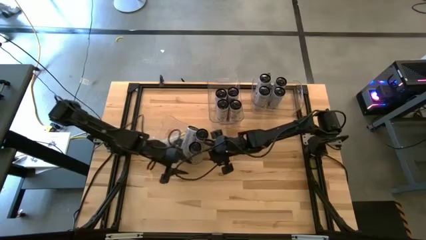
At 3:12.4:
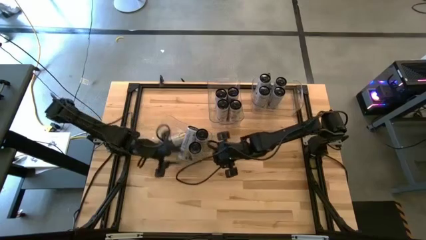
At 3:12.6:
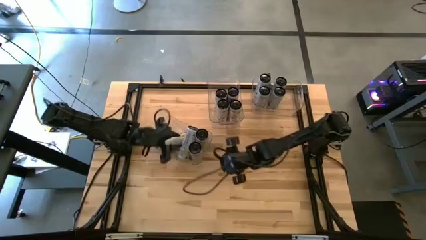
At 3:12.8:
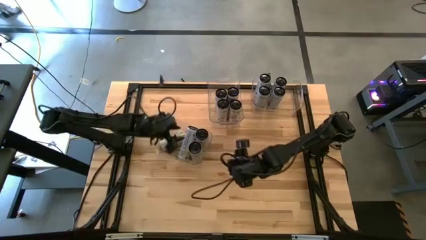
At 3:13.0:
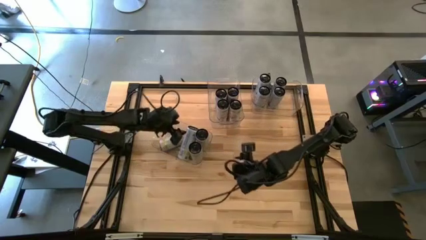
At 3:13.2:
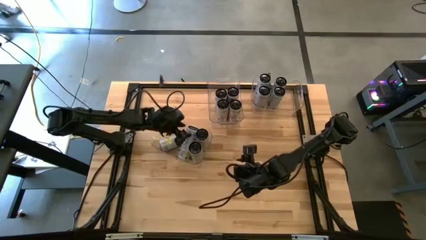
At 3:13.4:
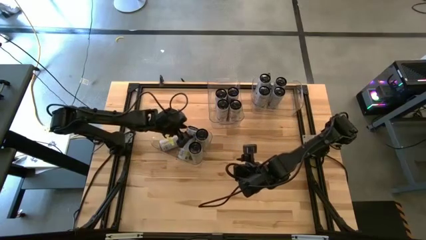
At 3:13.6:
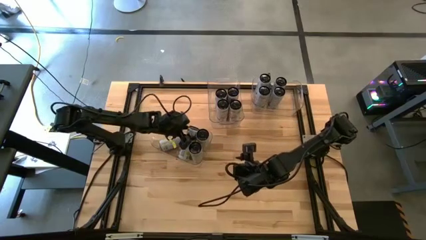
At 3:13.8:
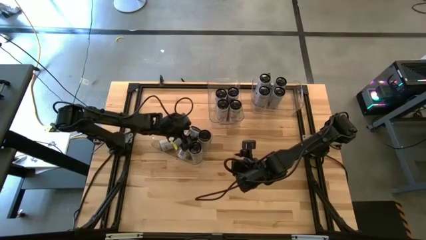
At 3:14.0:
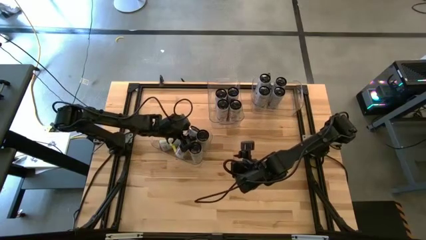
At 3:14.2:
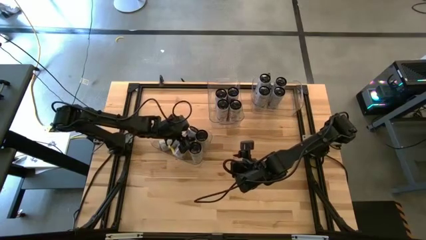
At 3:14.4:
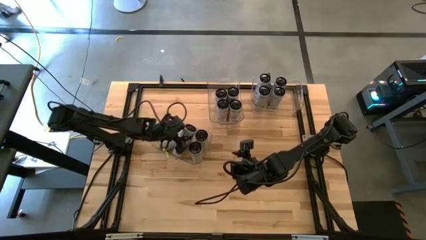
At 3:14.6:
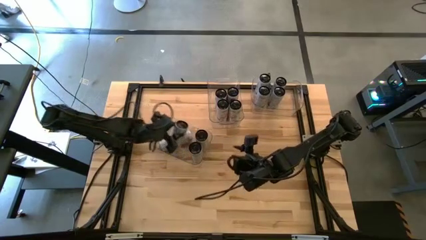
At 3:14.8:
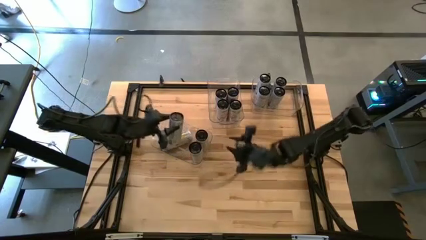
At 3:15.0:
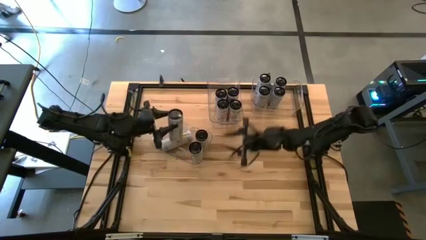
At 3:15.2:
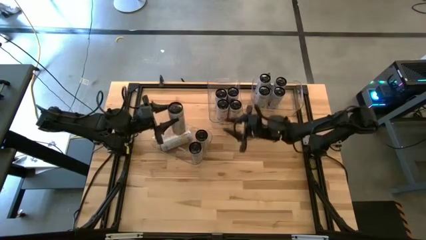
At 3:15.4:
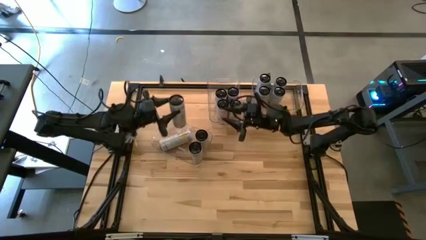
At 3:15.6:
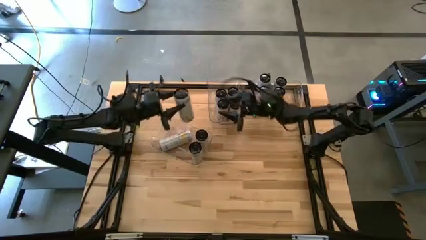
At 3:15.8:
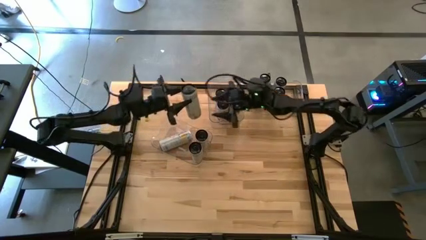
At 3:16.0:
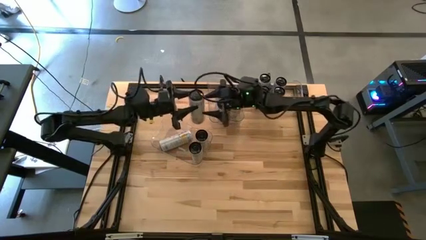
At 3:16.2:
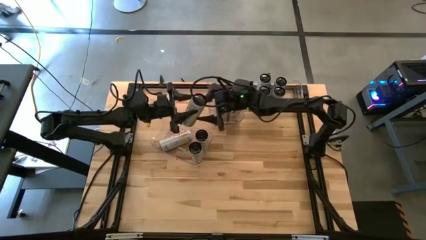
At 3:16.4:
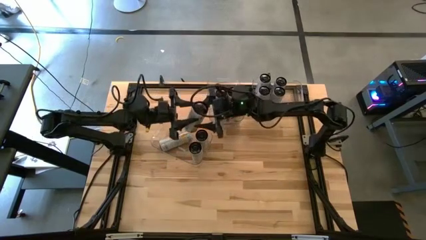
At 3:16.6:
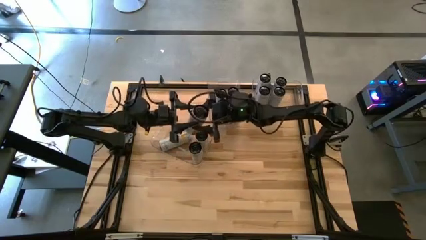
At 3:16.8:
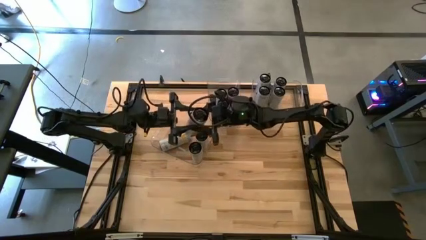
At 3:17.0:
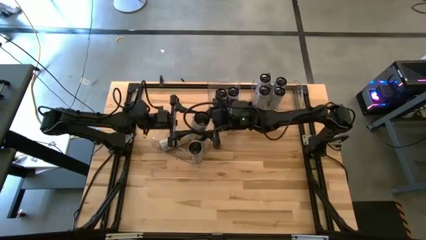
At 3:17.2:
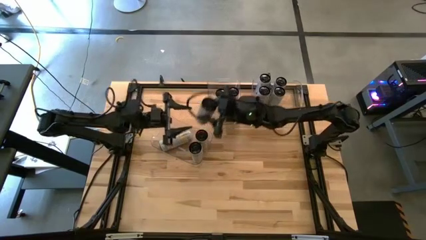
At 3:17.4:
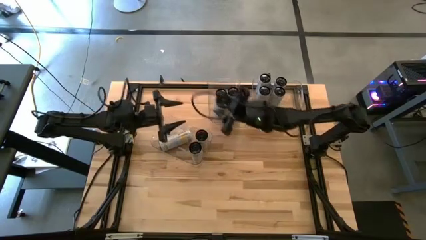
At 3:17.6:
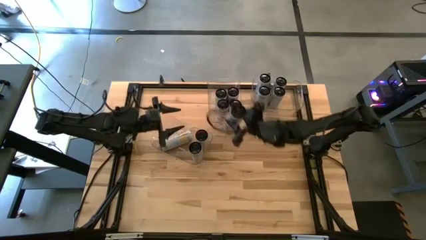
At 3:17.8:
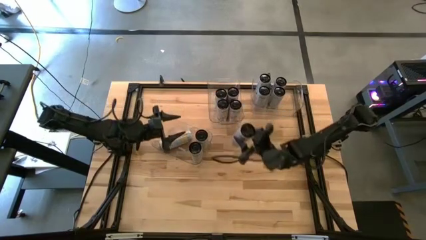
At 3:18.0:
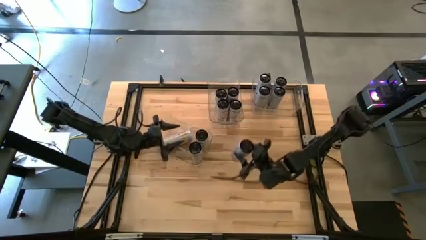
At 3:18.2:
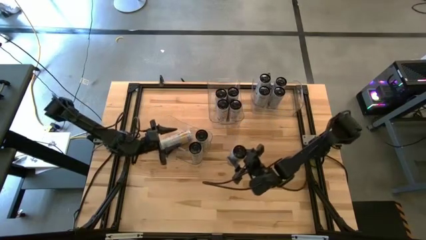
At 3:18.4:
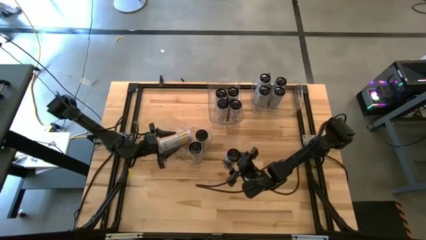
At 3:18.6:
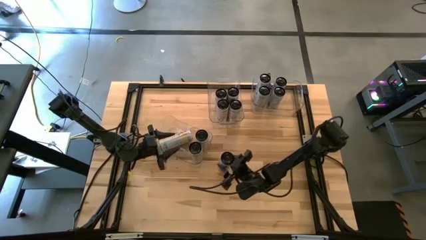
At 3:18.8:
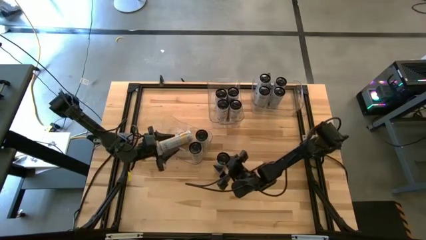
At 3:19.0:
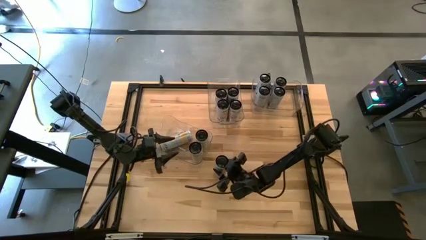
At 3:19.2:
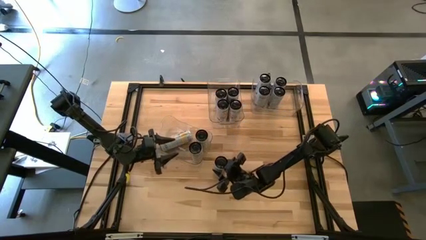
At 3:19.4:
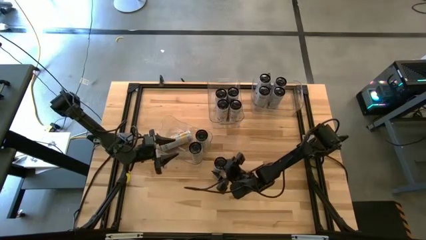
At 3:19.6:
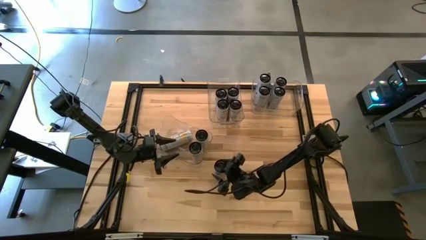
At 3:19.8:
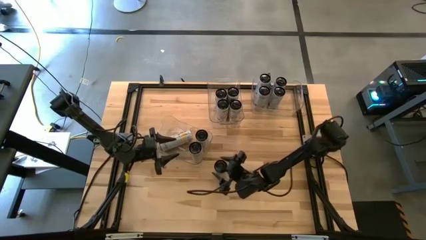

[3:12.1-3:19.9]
Task: Sort soda cans
Remove the white-yellow soda can from the top left transparent bin

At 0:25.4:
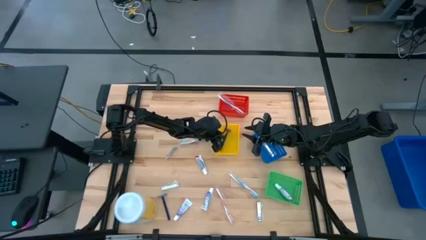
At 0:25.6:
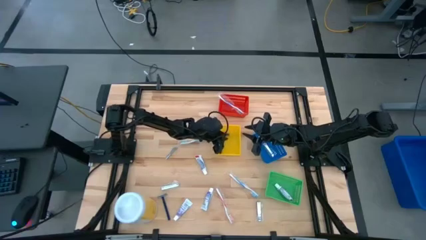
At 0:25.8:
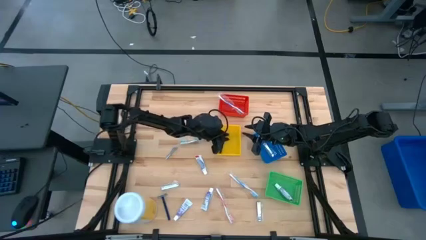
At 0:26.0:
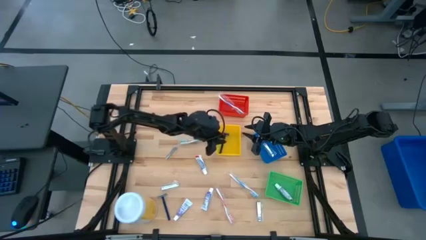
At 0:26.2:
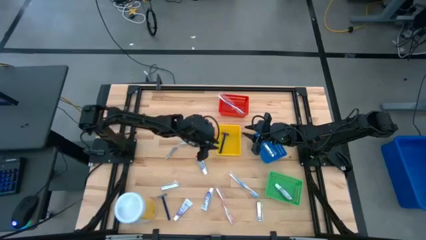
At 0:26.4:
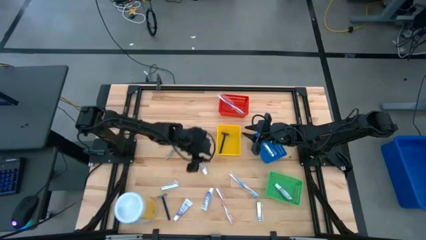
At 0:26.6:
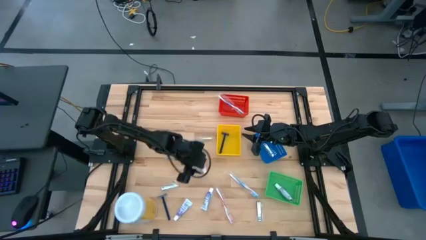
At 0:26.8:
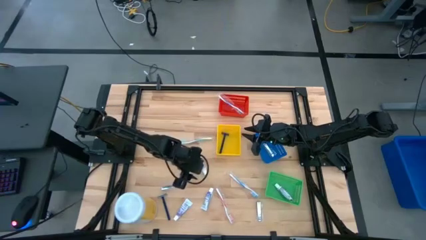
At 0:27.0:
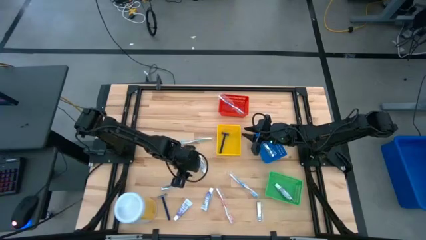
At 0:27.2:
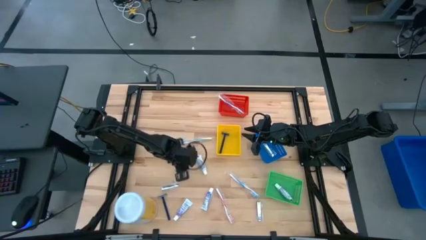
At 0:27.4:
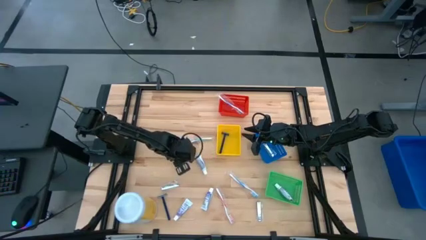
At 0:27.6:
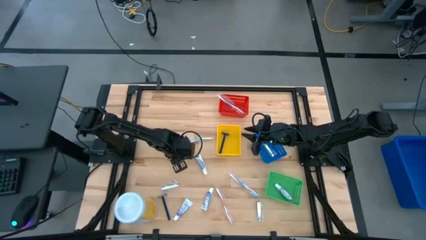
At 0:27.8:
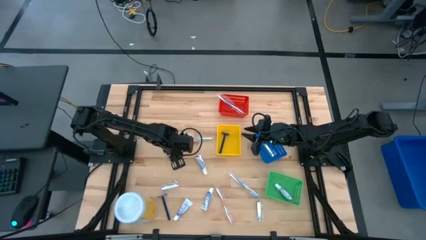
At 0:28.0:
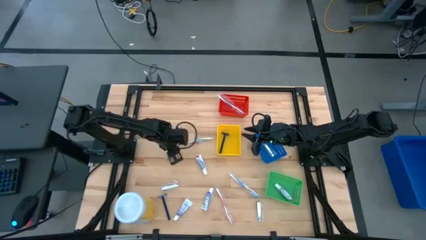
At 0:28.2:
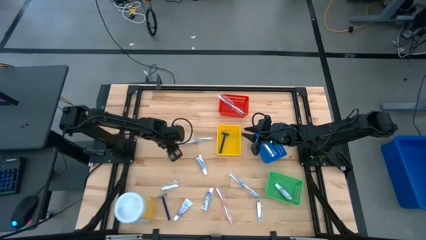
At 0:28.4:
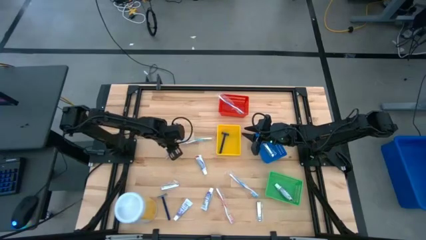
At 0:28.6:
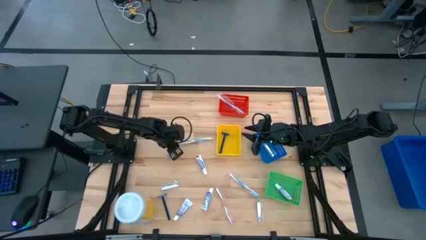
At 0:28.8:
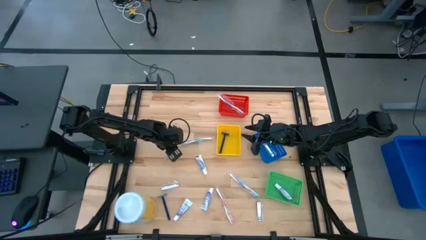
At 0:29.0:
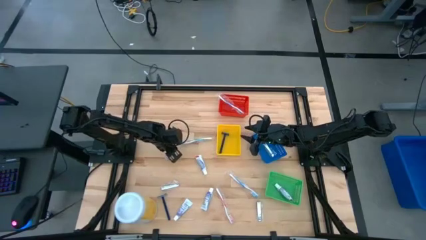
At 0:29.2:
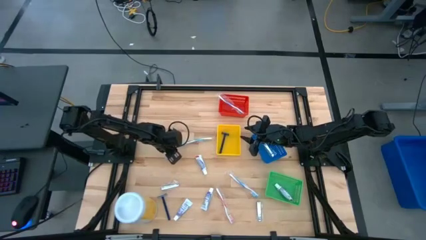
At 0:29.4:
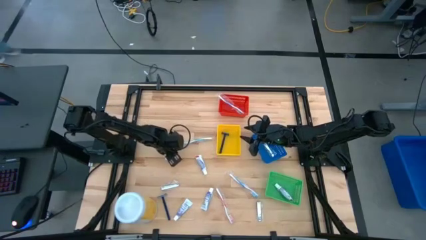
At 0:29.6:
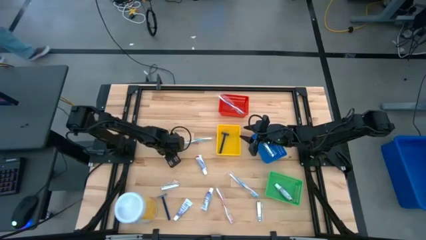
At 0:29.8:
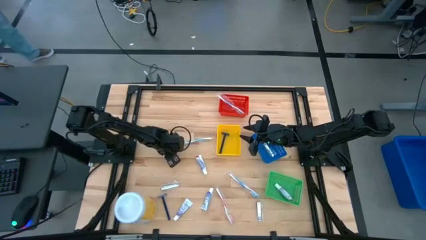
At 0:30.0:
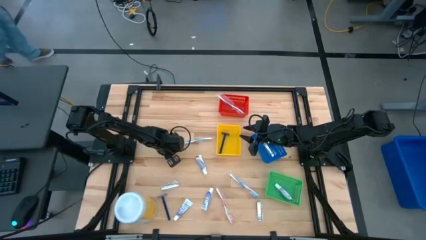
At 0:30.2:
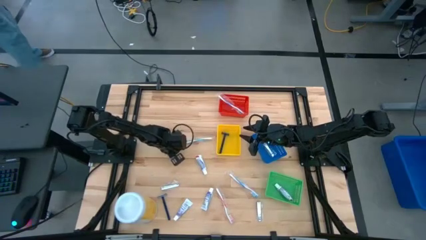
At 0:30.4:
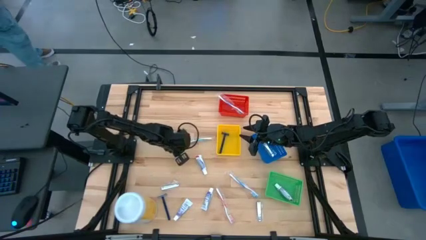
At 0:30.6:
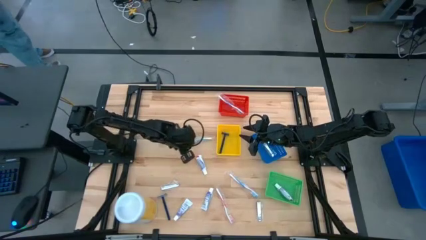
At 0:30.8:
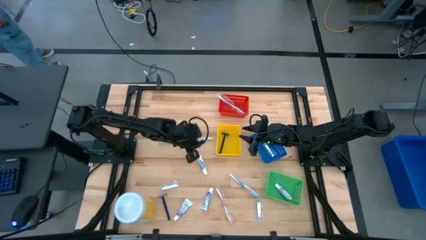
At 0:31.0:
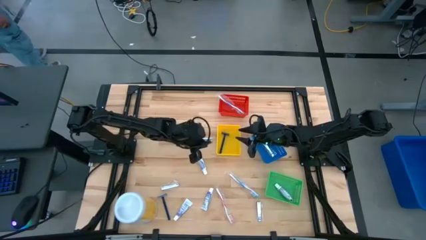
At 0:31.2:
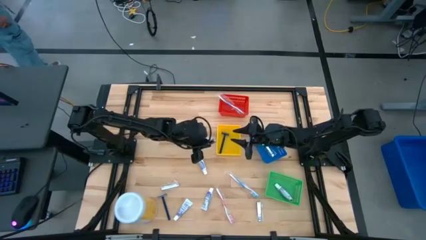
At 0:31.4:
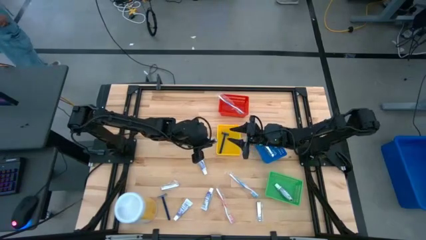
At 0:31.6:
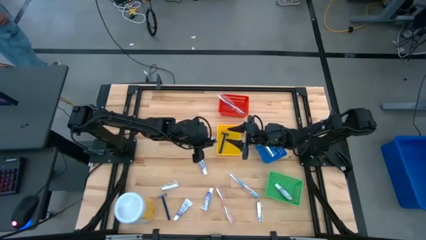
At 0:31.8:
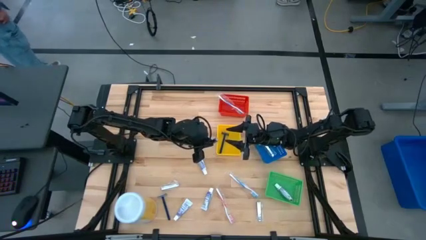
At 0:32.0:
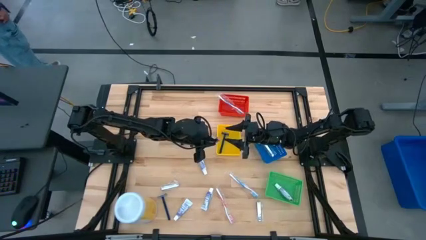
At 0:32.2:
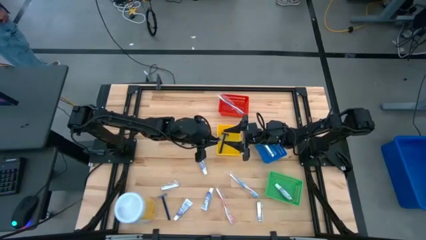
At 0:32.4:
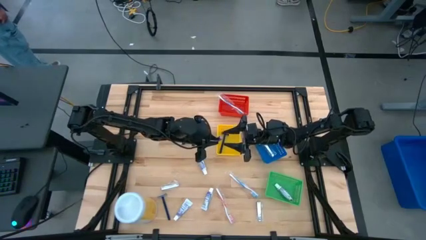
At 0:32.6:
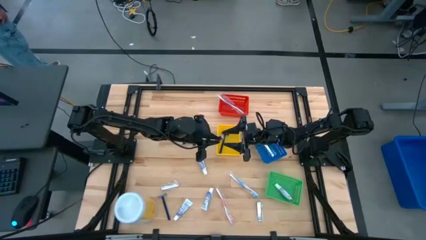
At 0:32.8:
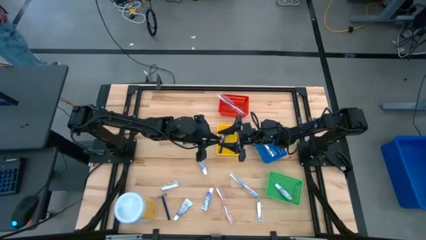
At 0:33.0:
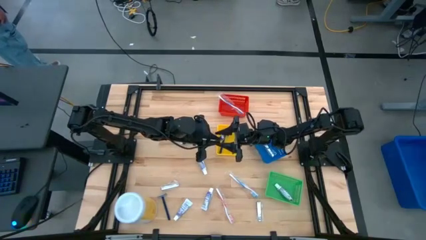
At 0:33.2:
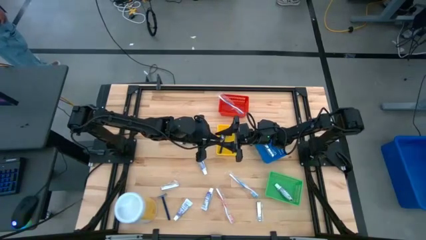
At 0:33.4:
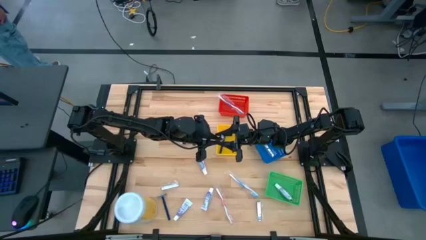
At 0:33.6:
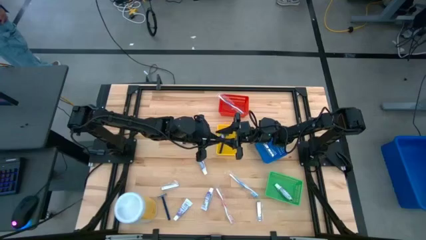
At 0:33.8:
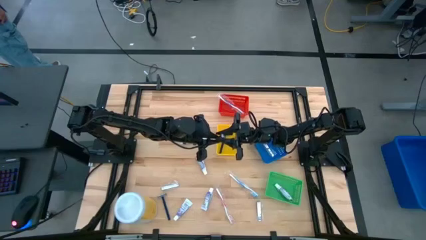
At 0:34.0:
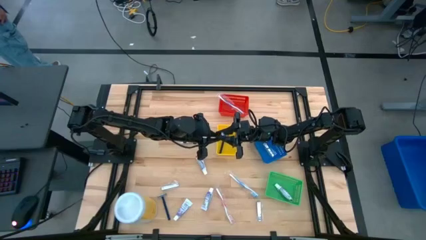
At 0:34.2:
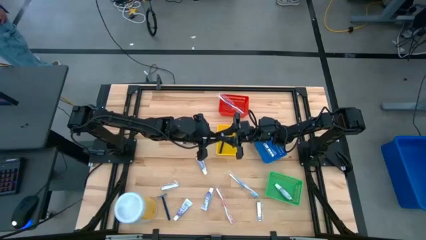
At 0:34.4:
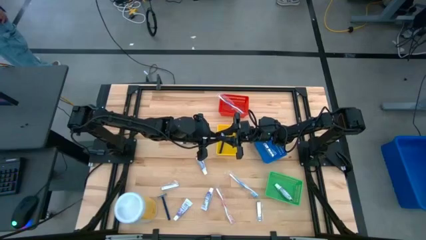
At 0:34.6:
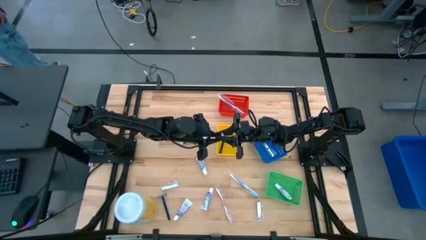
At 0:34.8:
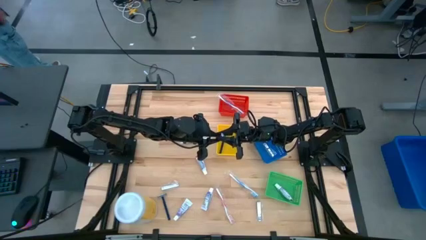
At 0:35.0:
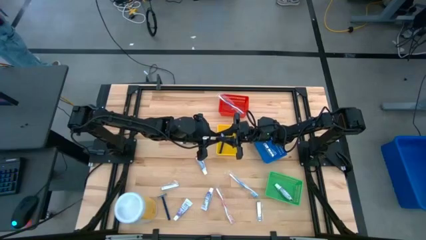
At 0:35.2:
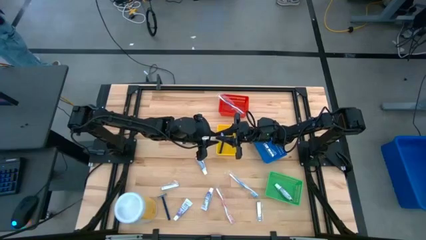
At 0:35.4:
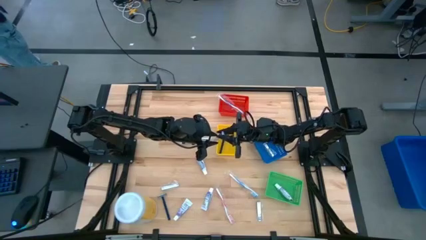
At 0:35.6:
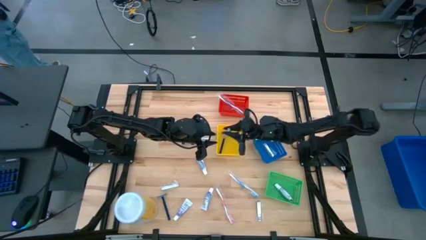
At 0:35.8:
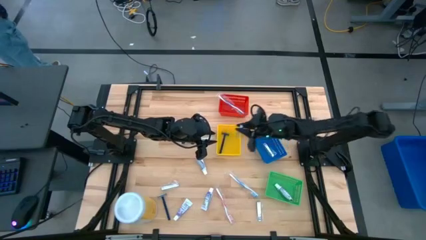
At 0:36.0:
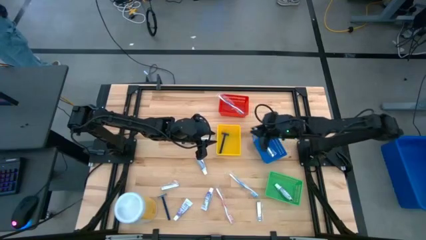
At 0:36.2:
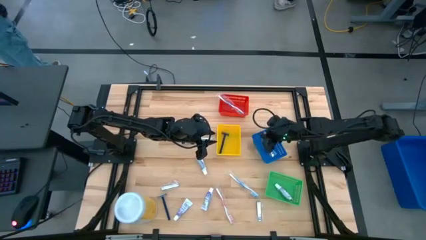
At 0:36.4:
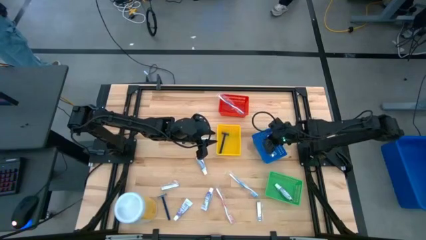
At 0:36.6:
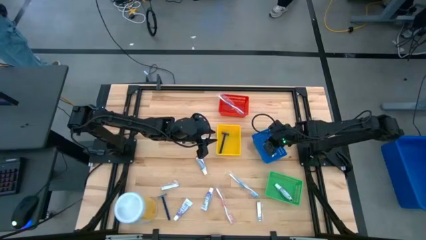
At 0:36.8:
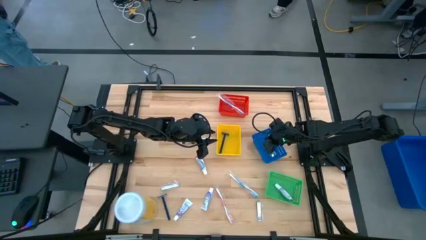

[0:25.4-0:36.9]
Task: Pick & Place Travel size toiletries
Put the nail cutter into the blue bin
